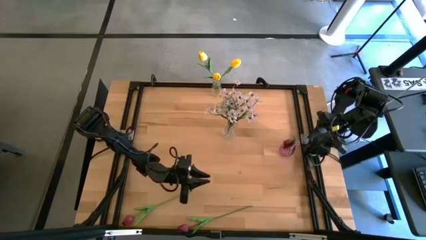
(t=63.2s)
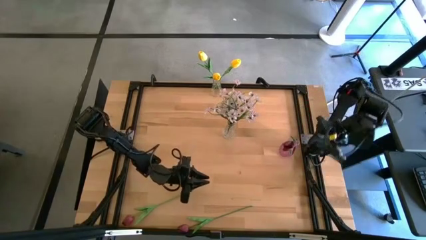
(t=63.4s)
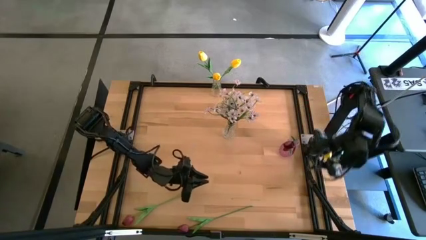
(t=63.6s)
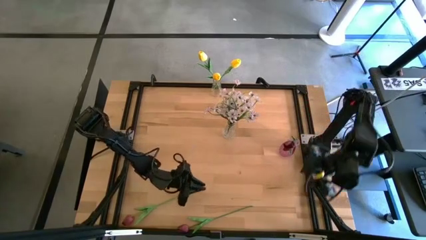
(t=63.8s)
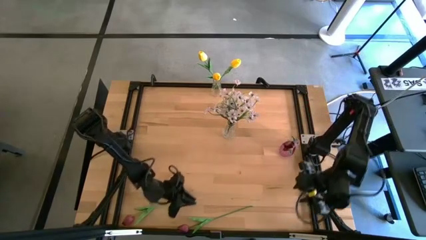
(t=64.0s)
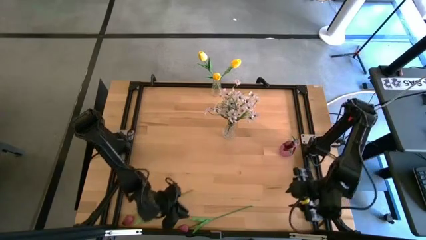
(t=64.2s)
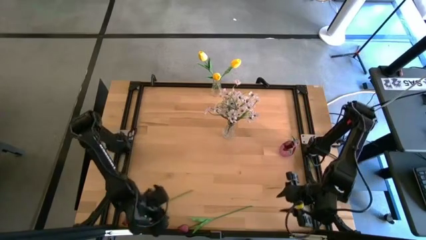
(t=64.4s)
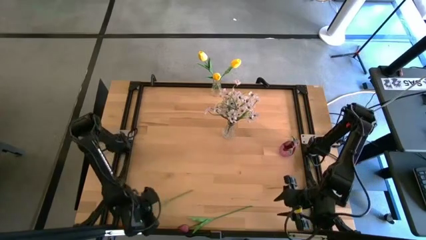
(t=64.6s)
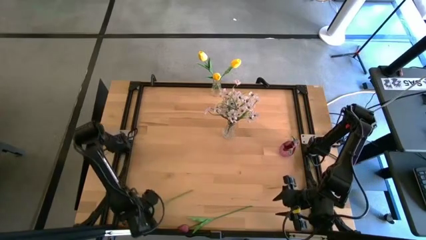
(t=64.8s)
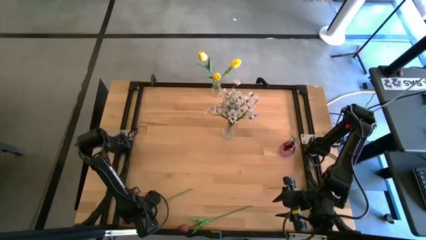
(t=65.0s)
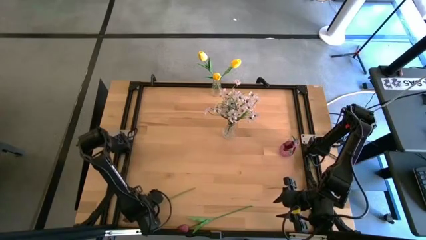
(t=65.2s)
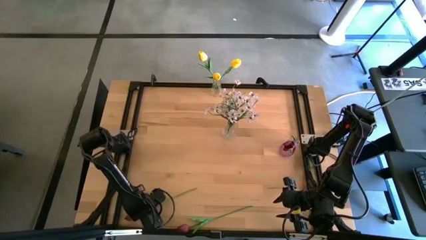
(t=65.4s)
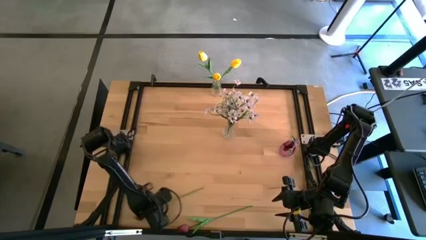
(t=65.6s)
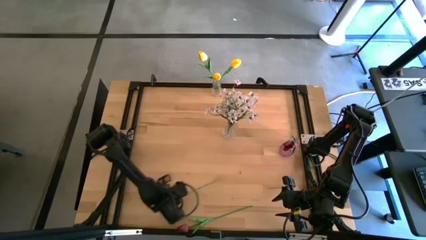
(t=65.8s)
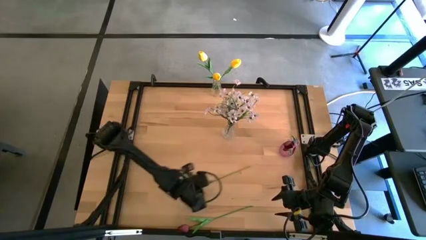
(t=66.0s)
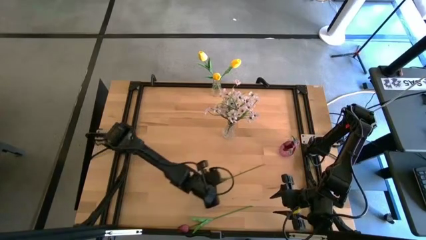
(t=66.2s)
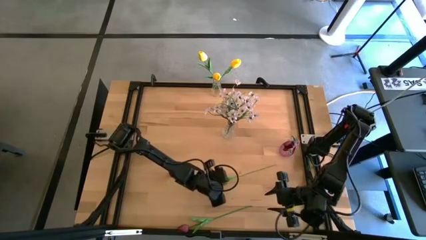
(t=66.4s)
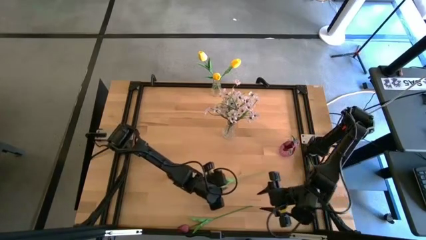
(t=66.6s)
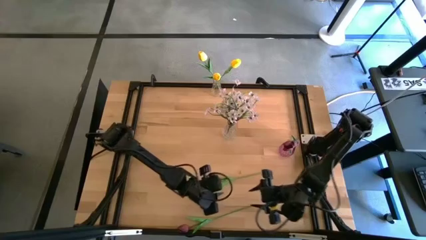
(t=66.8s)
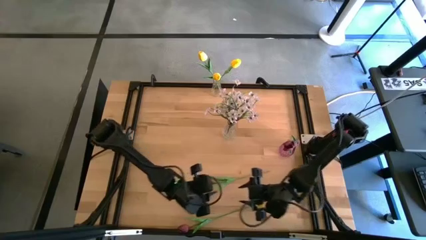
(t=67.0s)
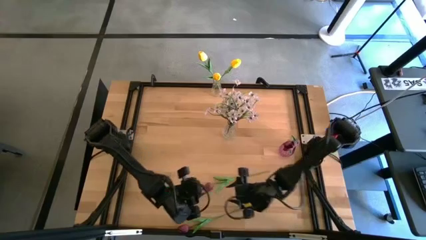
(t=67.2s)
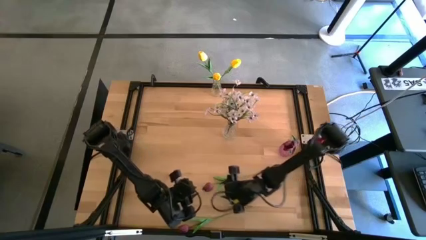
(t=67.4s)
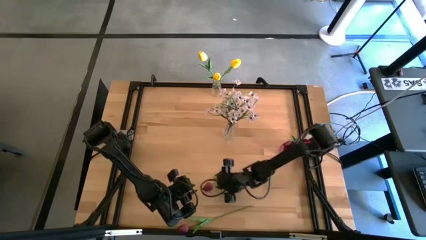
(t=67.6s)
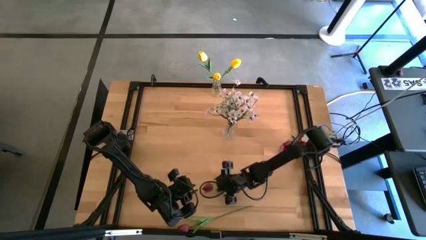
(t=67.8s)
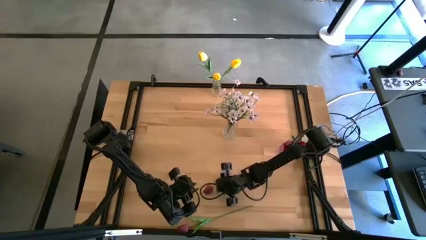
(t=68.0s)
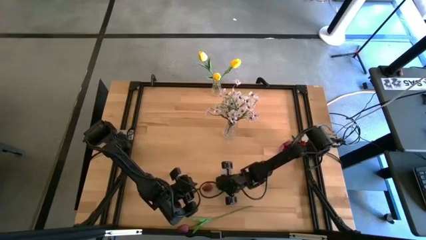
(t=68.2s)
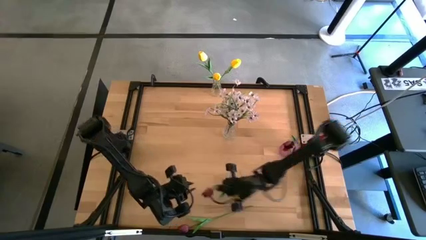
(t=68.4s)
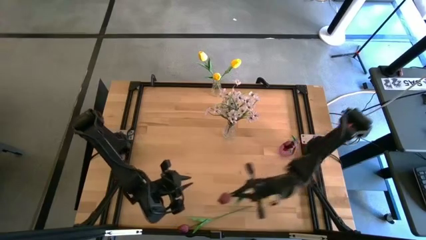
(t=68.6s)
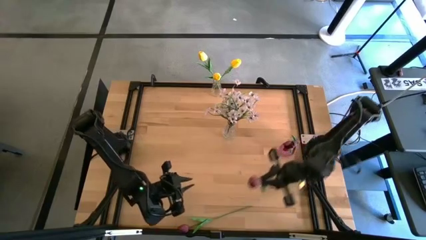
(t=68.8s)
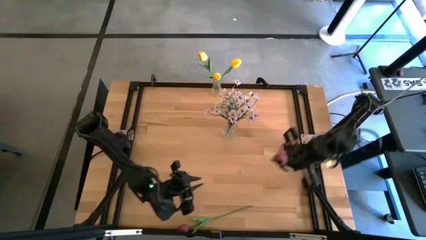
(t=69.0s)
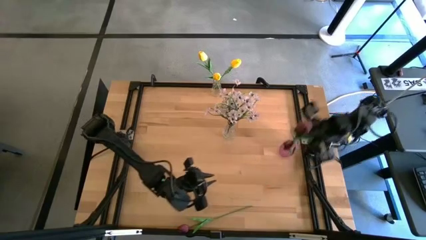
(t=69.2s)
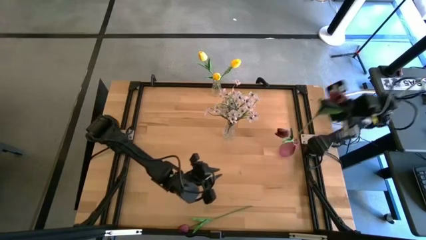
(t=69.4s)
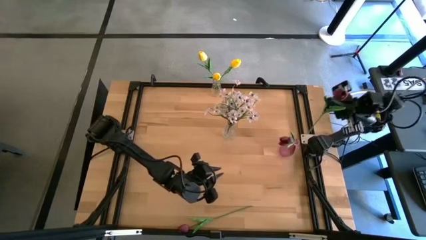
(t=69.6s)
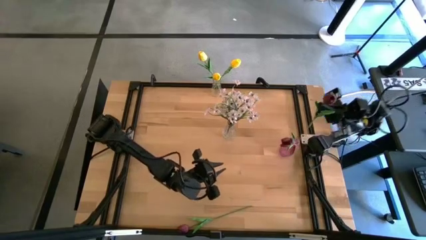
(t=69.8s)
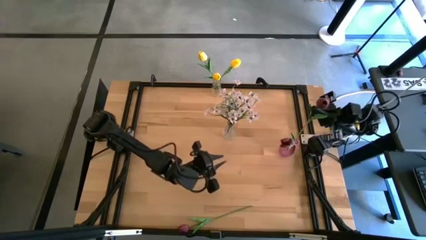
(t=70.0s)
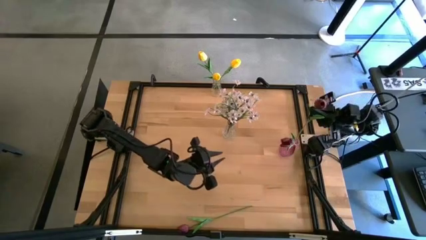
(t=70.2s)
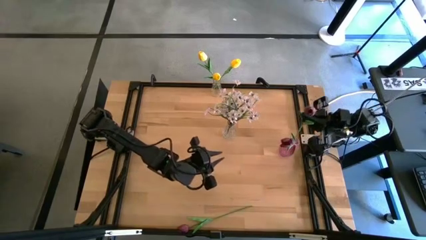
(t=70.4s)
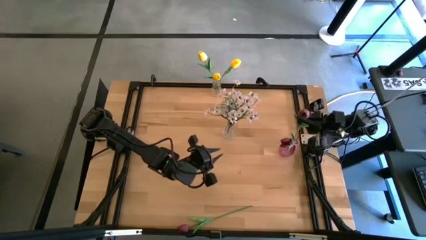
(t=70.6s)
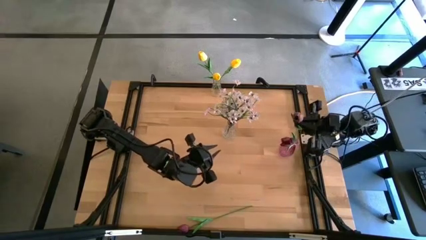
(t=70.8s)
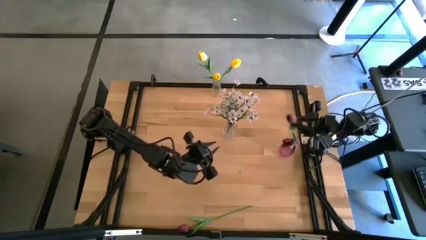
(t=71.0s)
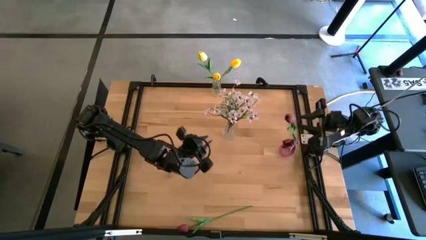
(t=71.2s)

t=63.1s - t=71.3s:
Task: Sort flowers into vase by color
Put the left red flower into the pink vase

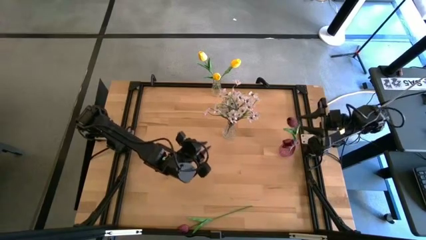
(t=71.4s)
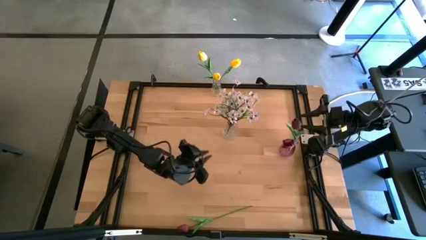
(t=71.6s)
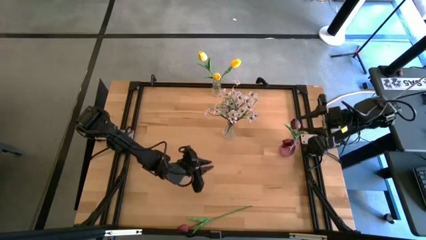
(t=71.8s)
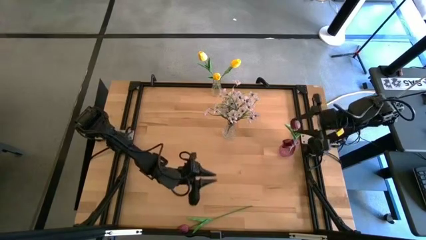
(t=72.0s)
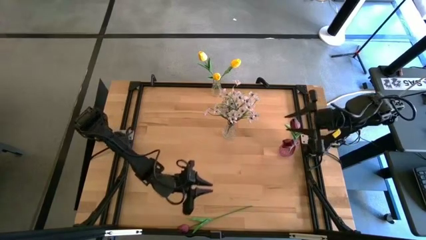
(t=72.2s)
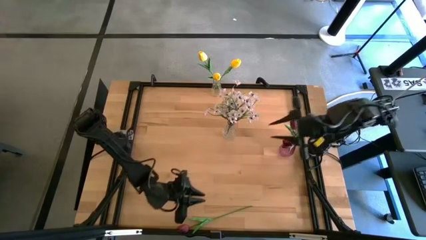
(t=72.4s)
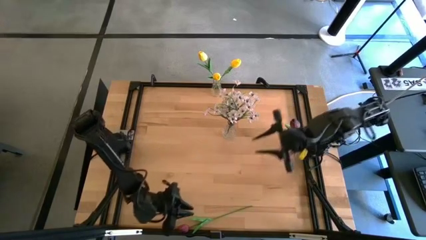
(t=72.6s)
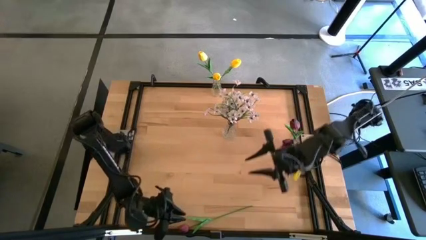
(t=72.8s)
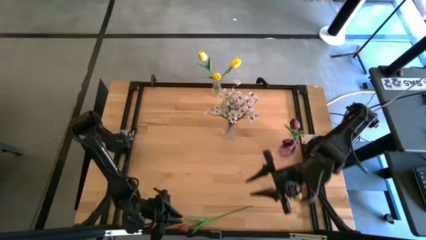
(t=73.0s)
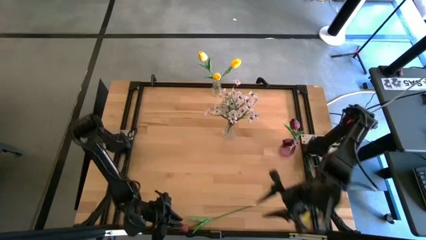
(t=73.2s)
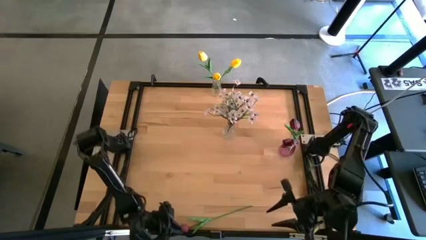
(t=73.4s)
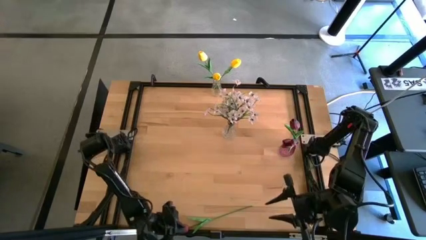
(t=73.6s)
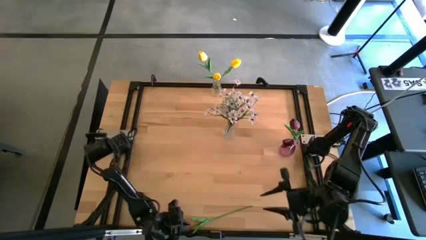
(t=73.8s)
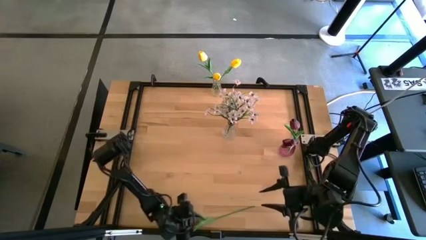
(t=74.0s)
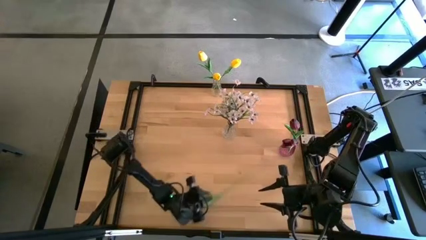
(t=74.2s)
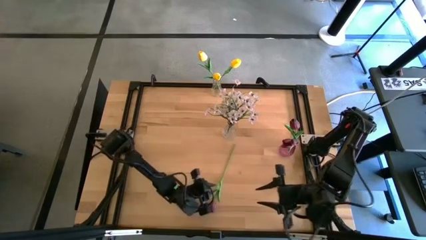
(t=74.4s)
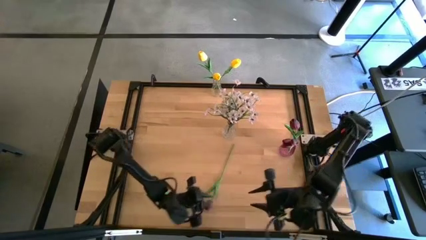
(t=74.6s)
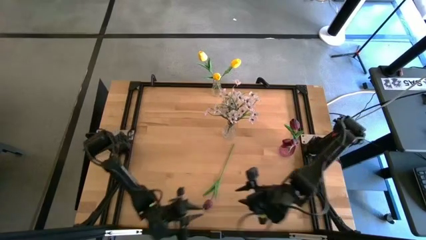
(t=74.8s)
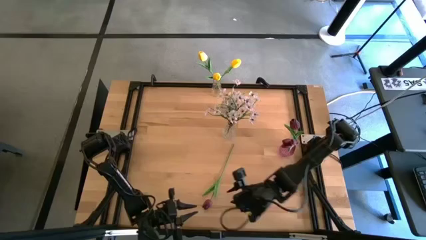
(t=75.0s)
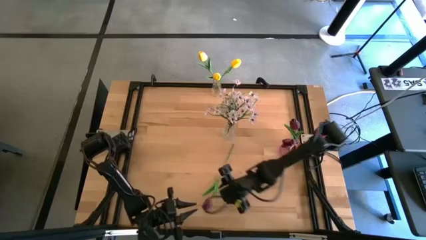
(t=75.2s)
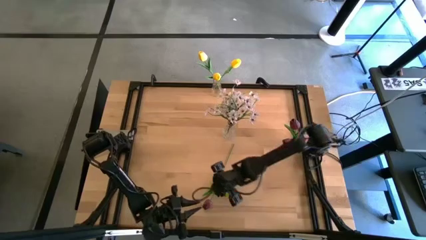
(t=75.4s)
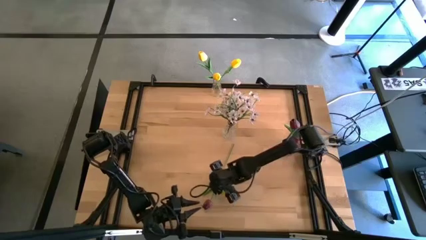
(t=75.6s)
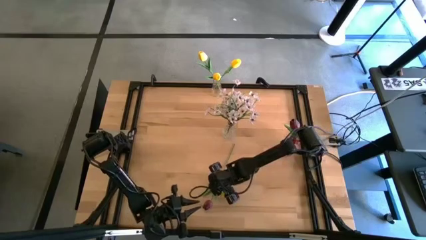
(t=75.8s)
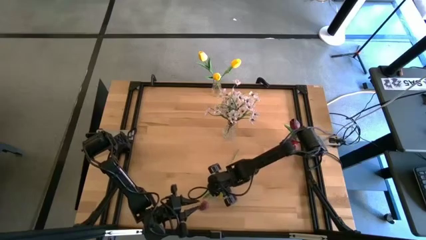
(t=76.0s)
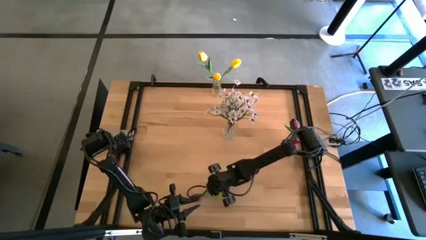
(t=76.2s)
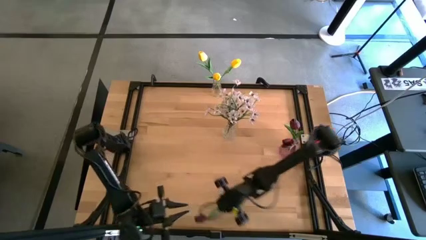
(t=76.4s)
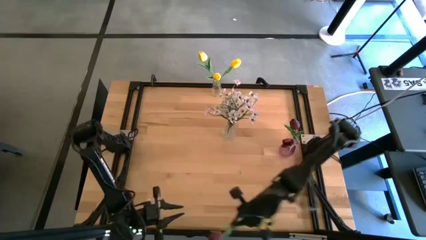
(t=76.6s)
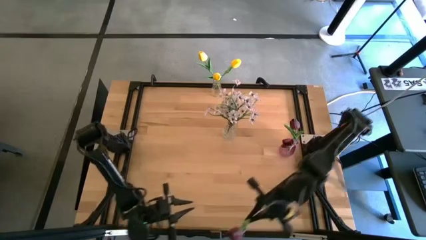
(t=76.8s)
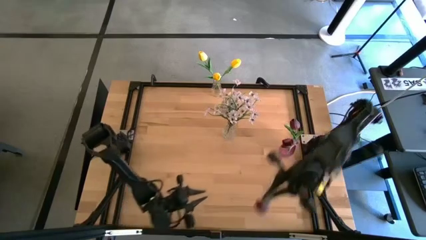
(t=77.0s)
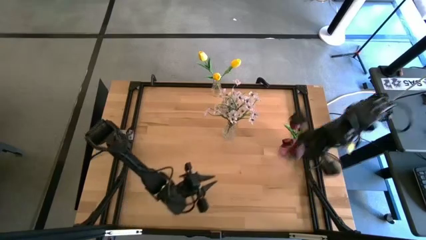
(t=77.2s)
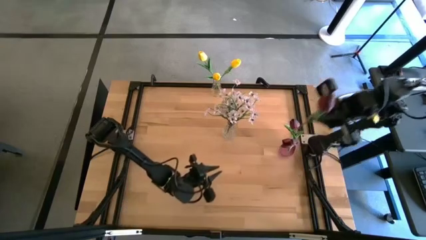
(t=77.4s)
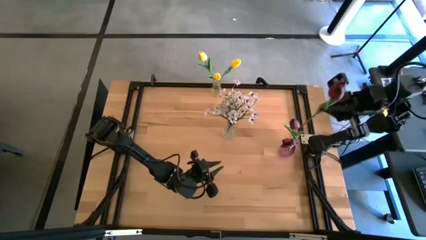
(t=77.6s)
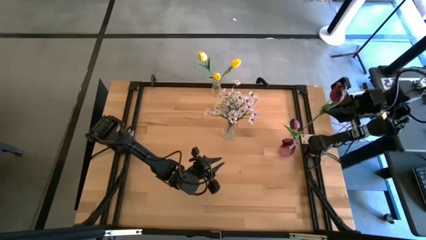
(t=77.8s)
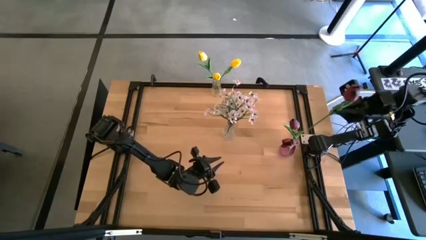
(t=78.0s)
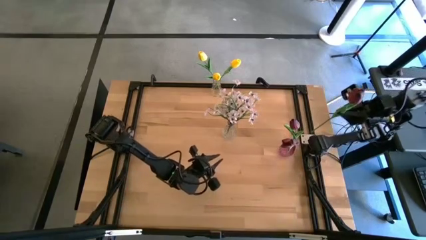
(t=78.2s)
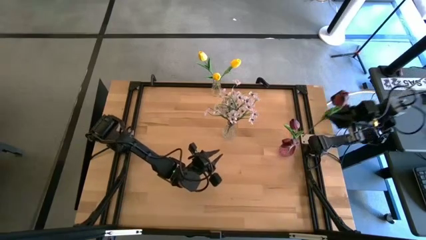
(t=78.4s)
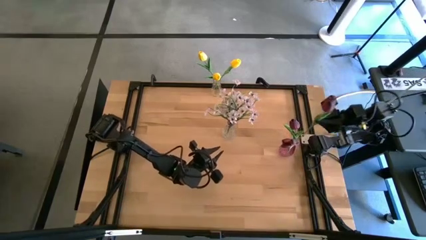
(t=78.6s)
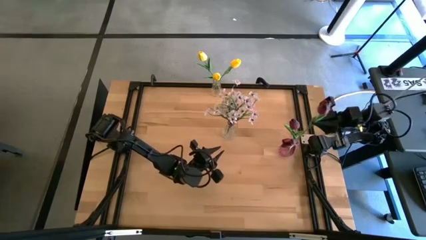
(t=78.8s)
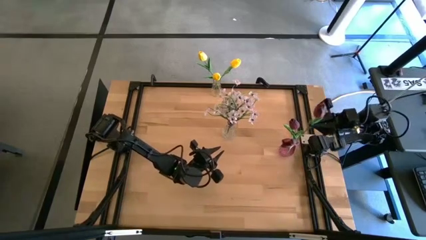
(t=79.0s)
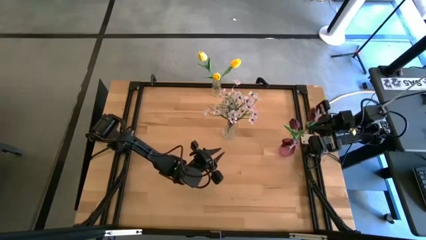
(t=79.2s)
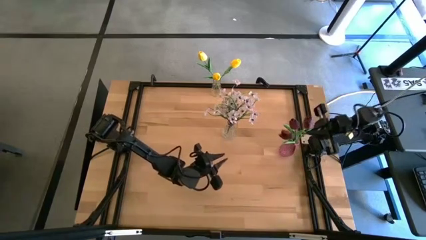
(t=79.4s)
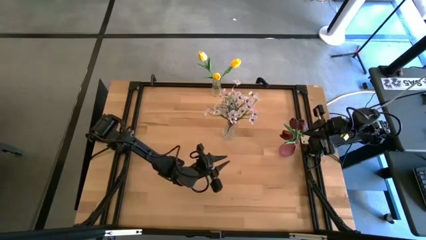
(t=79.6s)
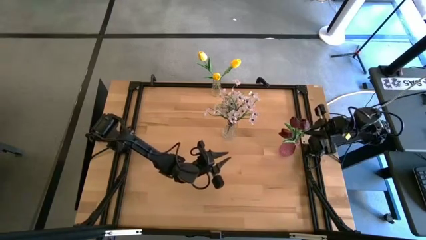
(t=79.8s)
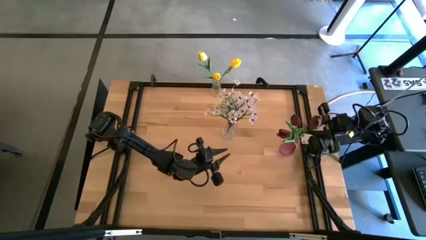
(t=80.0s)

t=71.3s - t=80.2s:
Put the red flower into the pink vase
